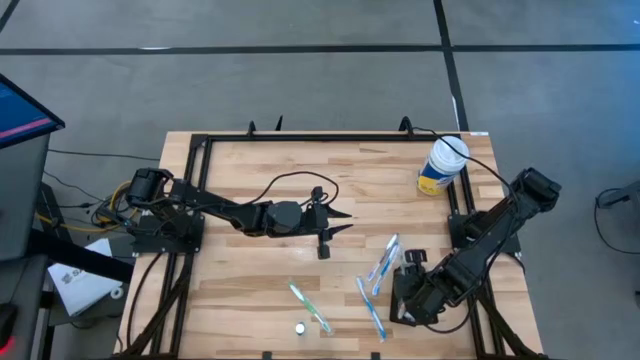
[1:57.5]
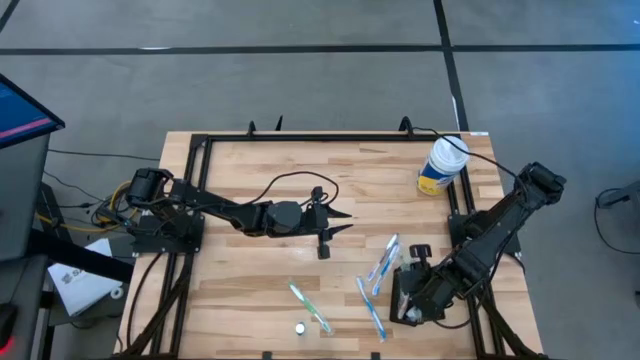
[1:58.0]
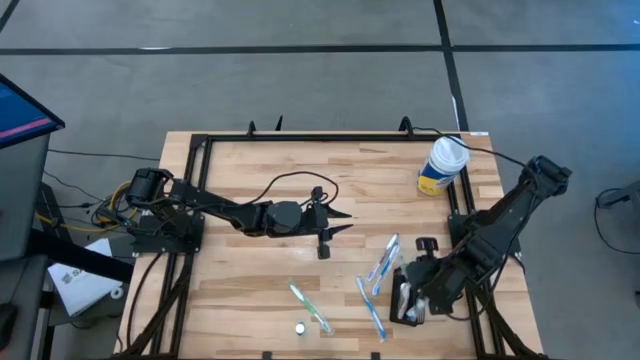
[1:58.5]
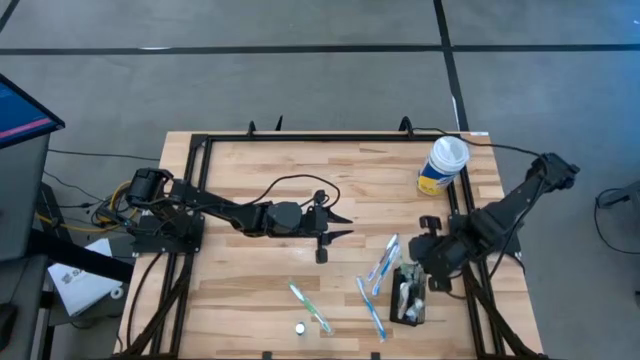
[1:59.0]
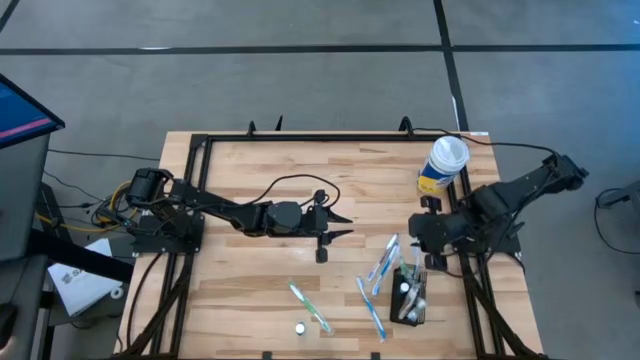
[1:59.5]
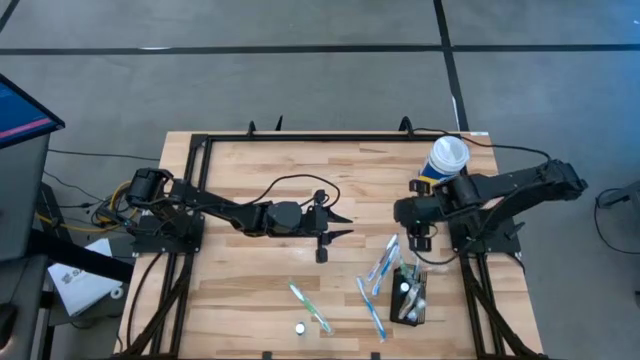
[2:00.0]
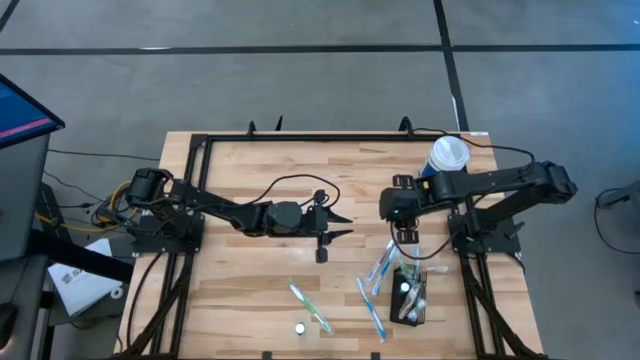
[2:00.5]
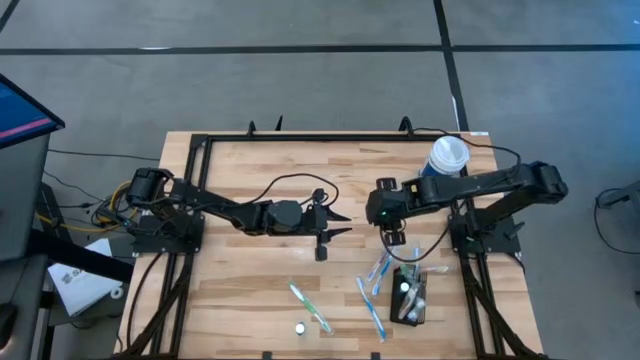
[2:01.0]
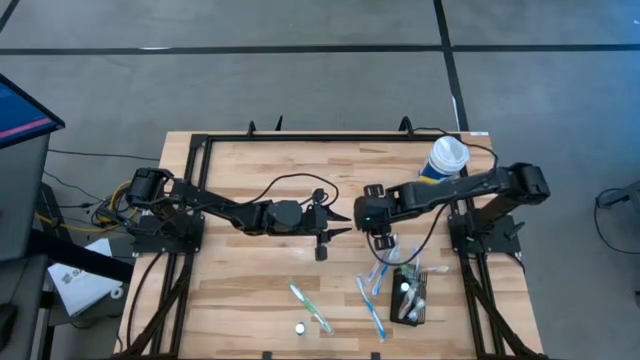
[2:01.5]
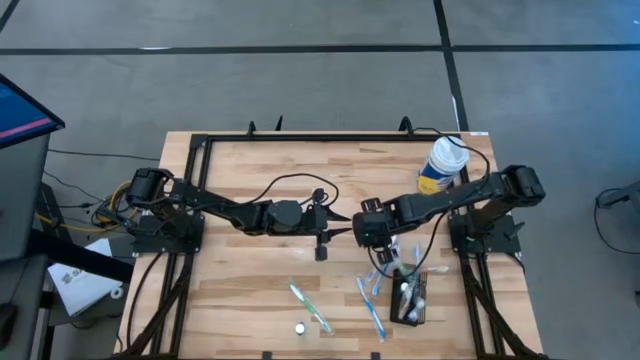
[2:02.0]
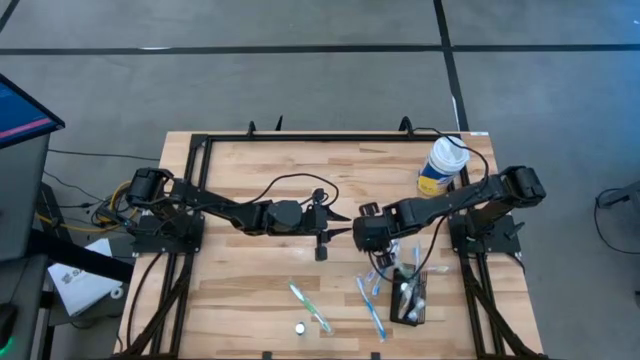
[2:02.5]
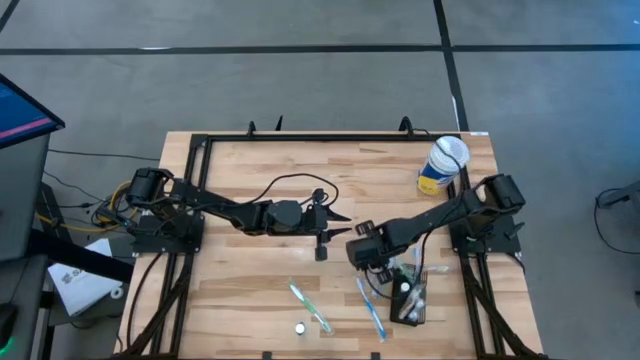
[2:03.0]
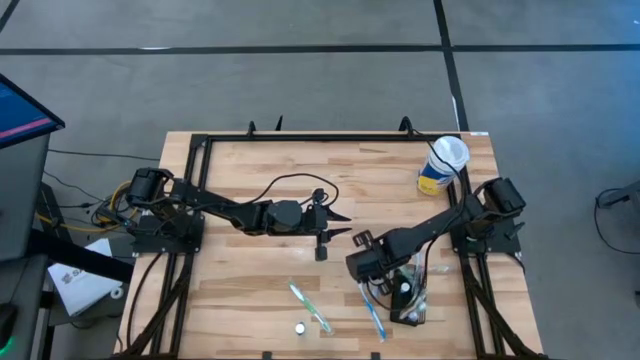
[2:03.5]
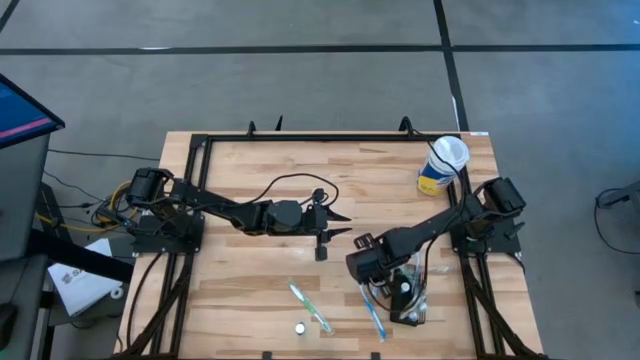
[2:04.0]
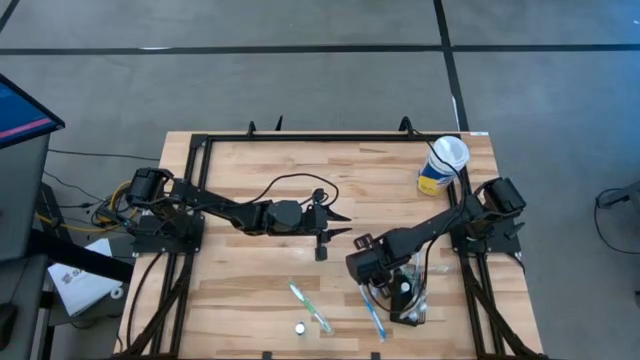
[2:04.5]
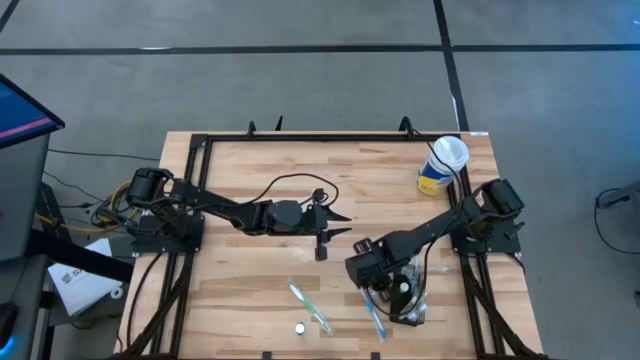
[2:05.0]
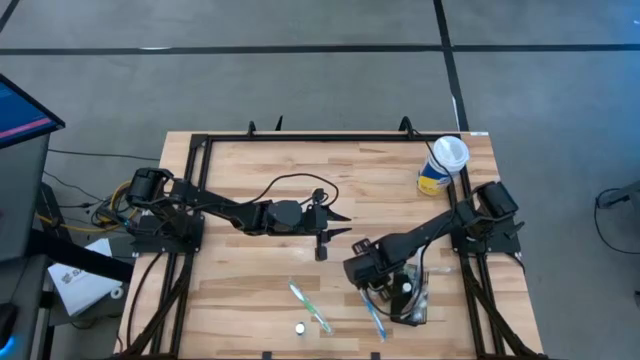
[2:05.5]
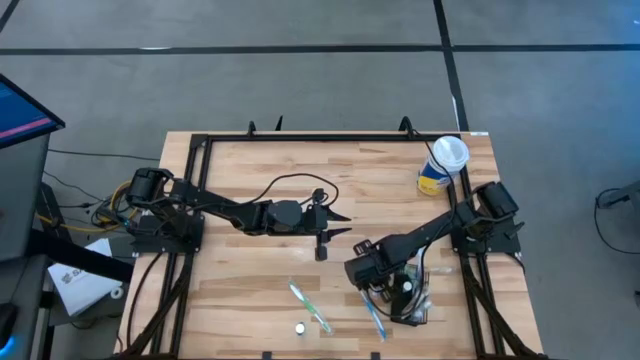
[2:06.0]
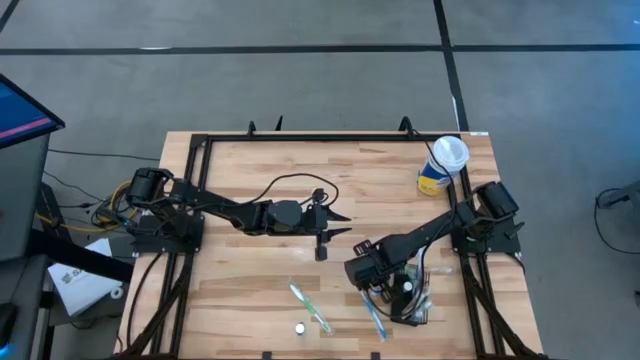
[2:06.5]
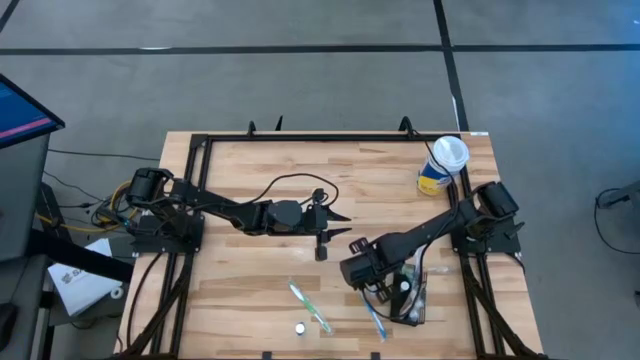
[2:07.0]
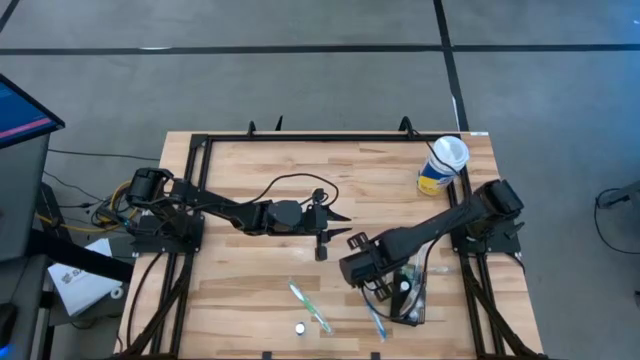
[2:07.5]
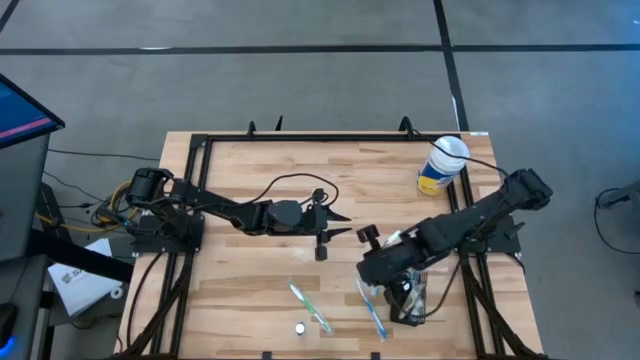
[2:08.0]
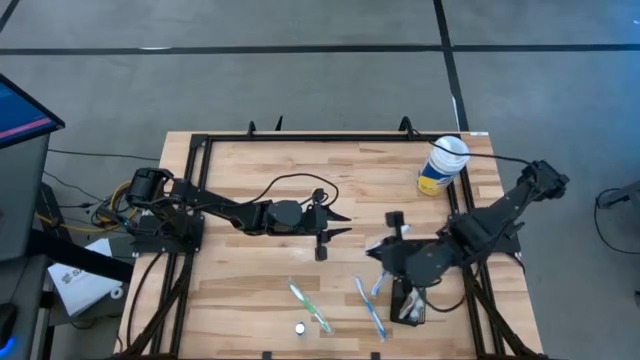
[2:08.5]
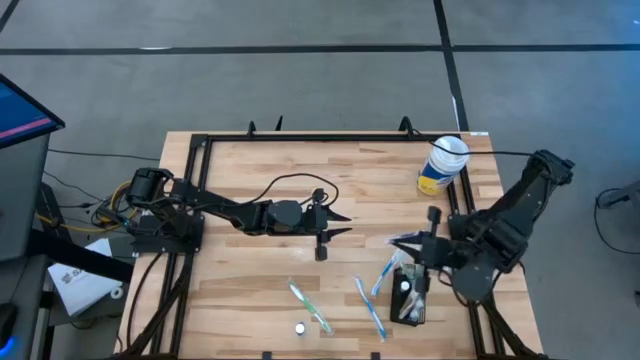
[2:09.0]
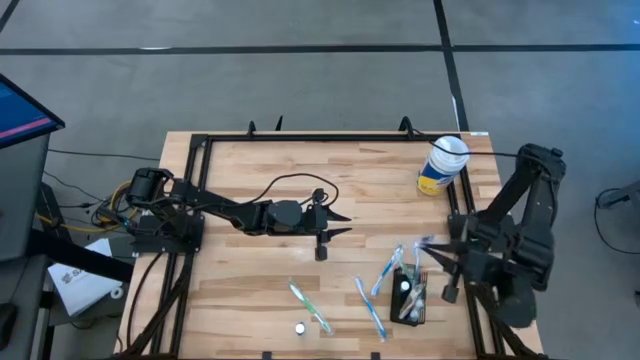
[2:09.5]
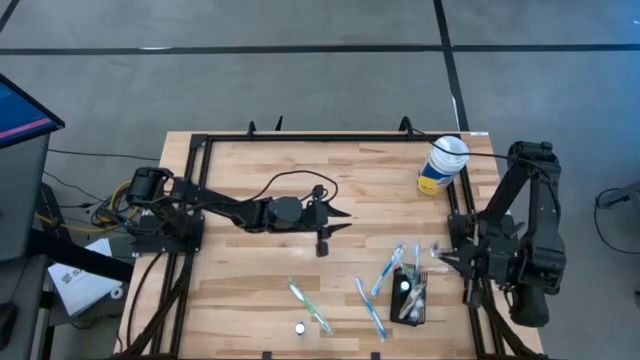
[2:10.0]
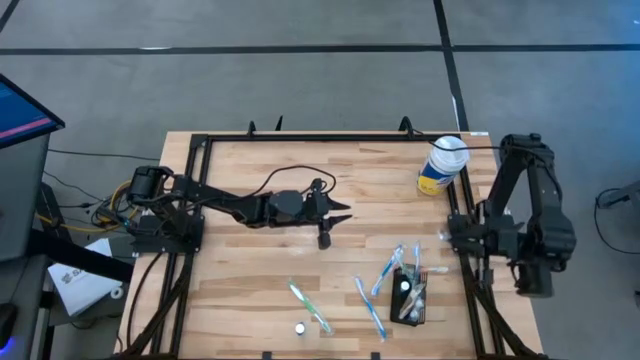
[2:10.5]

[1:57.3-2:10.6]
Task: Pick & Place toothbrushing station
Put the purple toothbrush into the black wire organizer

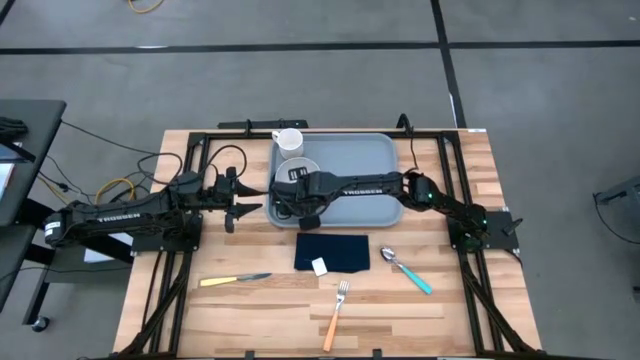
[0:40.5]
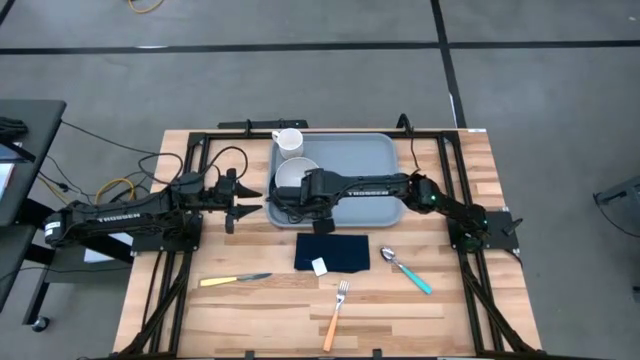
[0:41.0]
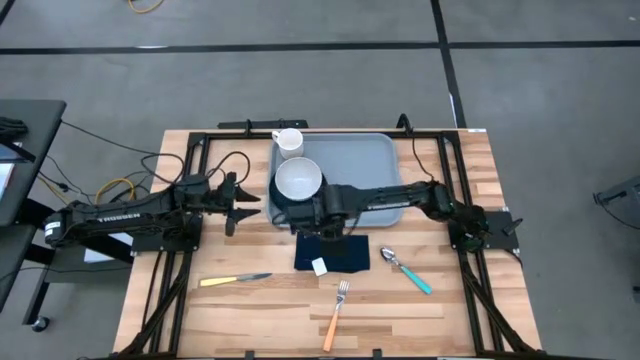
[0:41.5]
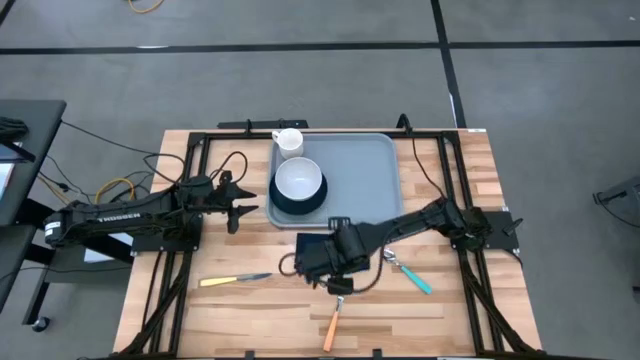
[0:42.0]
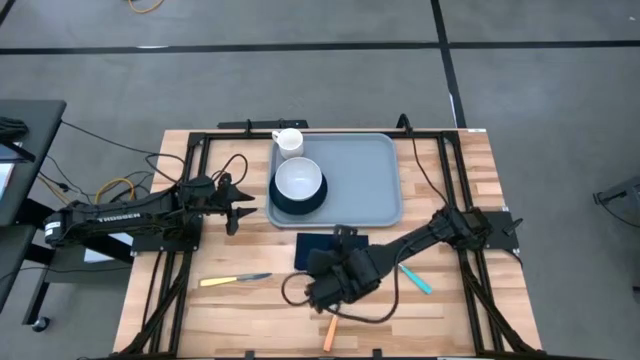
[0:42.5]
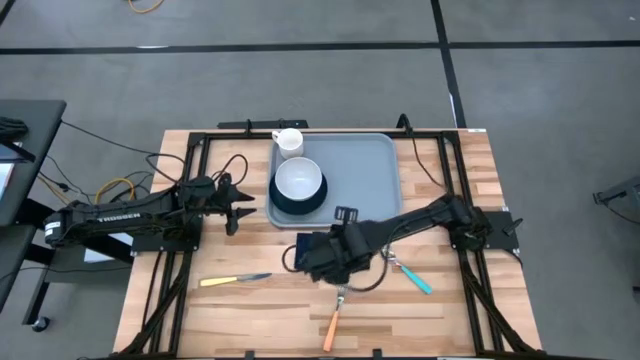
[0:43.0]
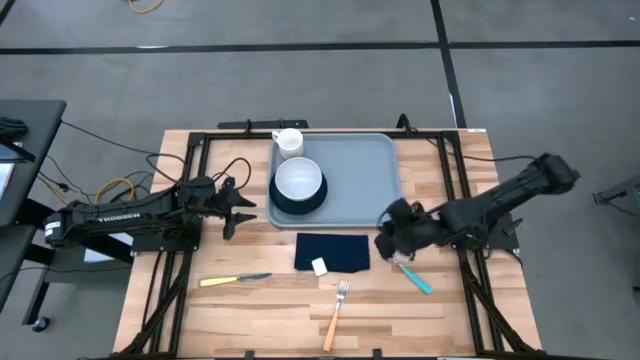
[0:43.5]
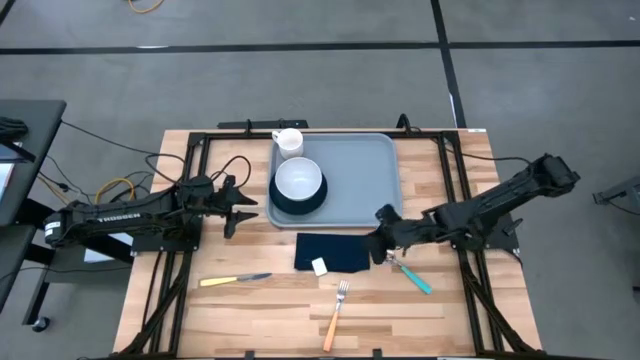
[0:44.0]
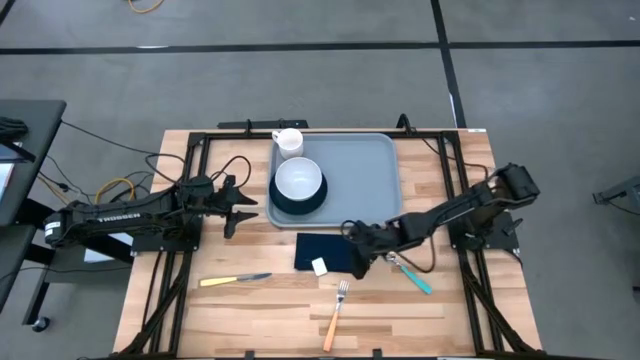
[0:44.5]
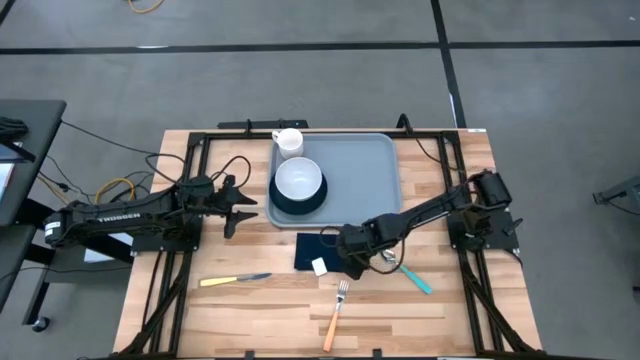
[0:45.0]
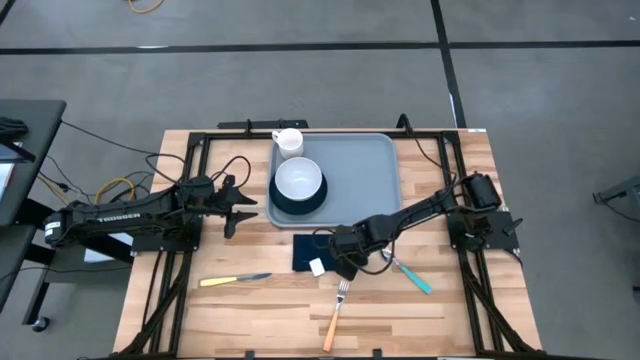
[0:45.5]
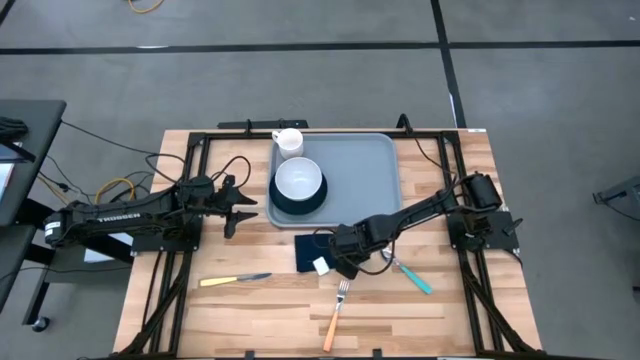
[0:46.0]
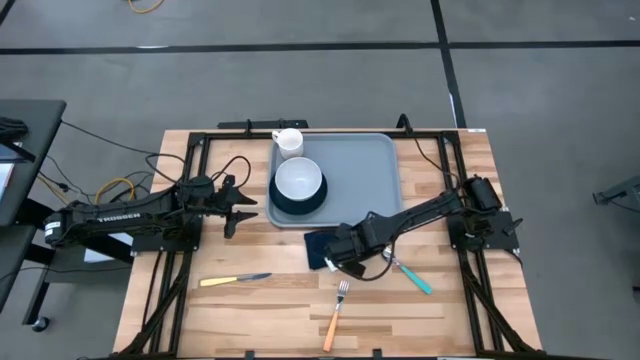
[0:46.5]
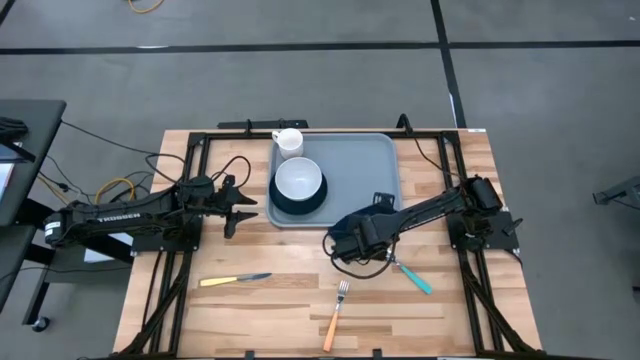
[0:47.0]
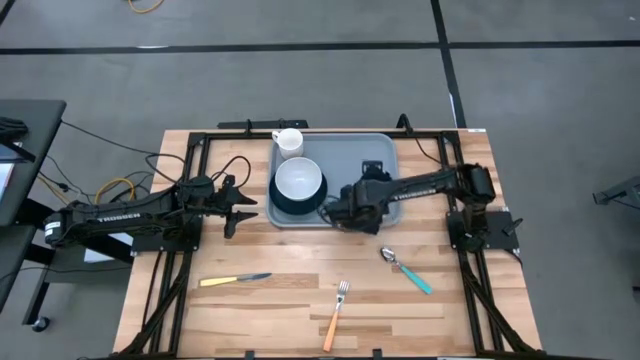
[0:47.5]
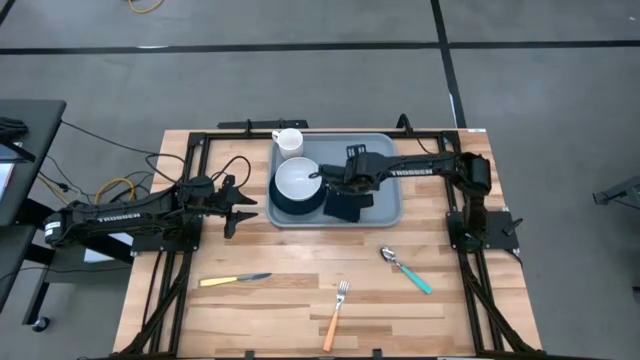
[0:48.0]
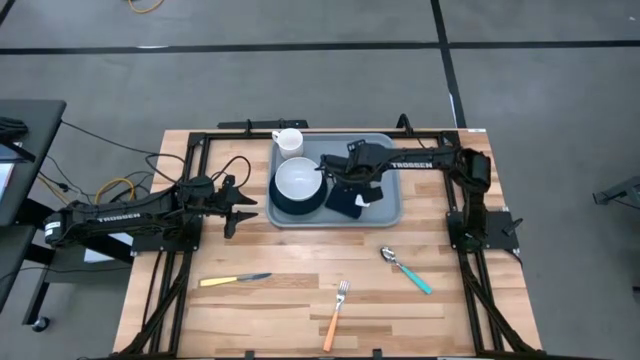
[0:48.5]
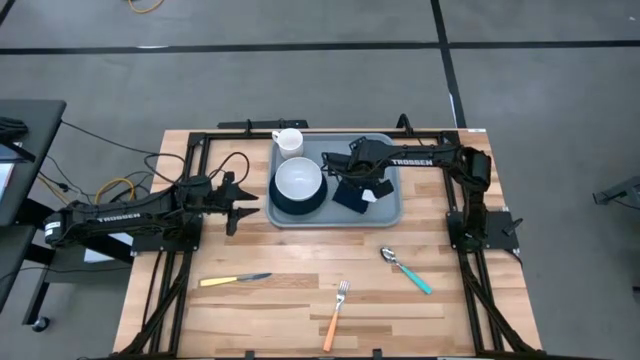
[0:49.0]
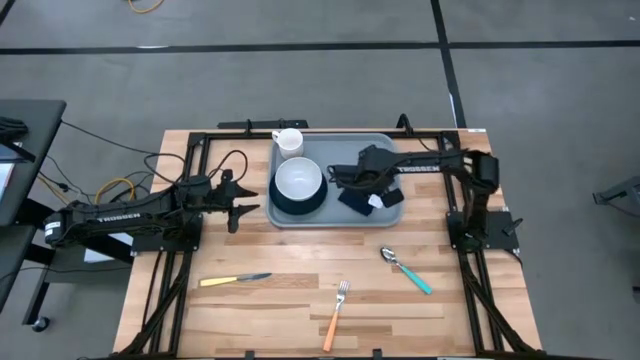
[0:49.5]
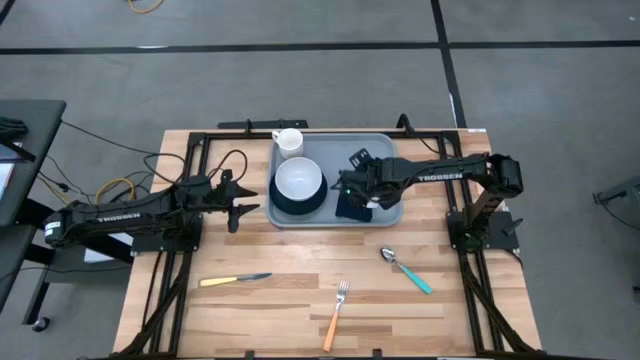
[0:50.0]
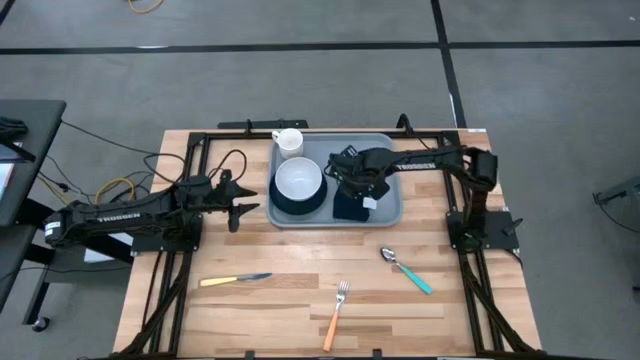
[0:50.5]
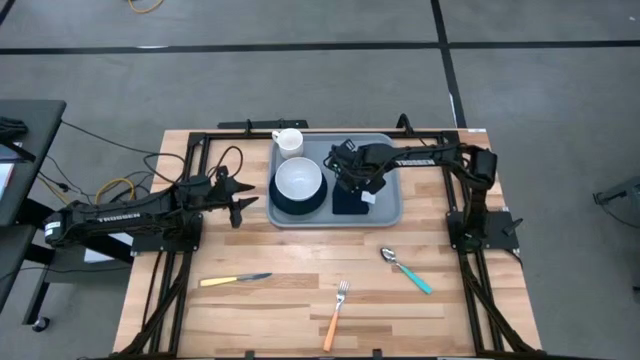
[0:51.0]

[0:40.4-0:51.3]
Task: Set up tray
Put the black napkin to the right side of the plate and bowl on the gray serving tray
